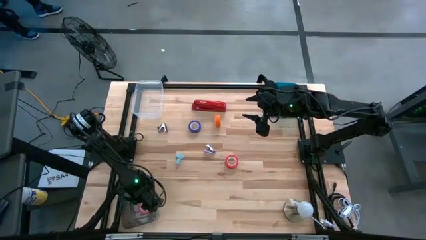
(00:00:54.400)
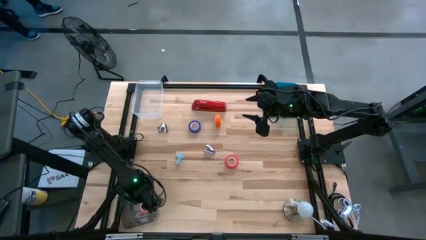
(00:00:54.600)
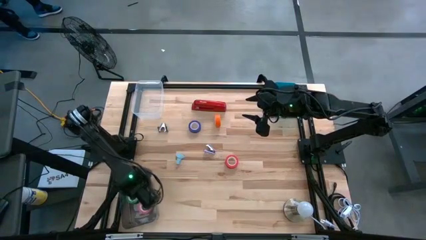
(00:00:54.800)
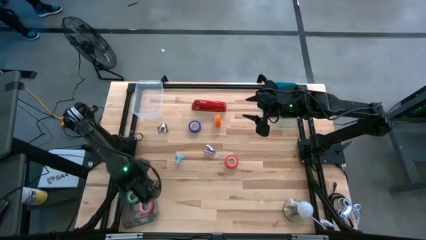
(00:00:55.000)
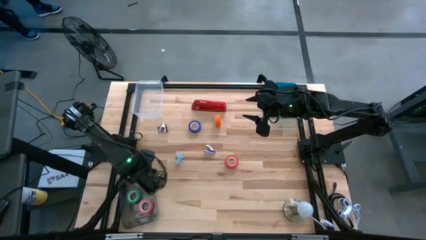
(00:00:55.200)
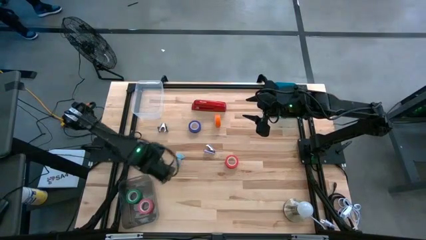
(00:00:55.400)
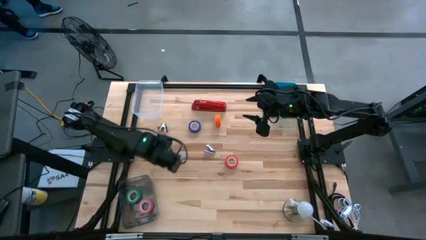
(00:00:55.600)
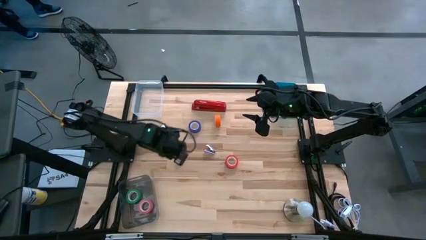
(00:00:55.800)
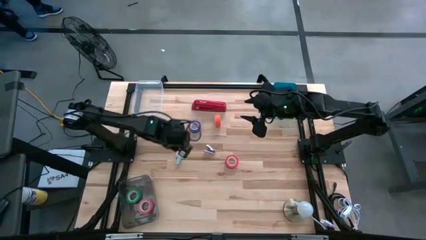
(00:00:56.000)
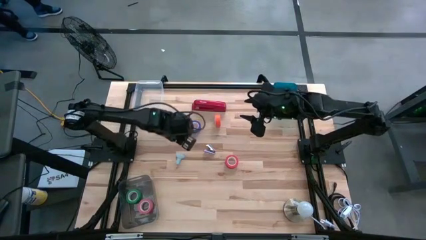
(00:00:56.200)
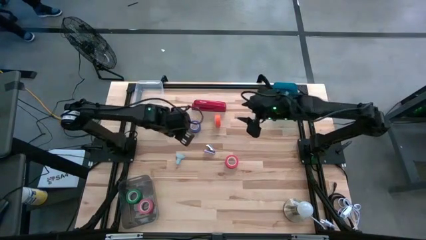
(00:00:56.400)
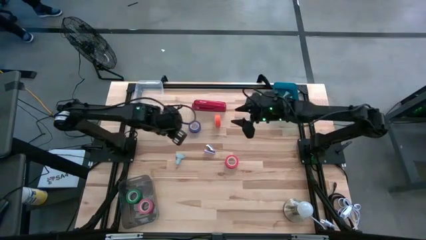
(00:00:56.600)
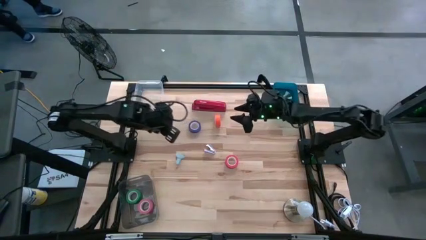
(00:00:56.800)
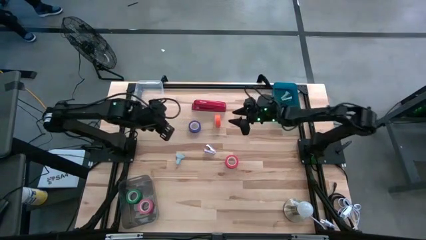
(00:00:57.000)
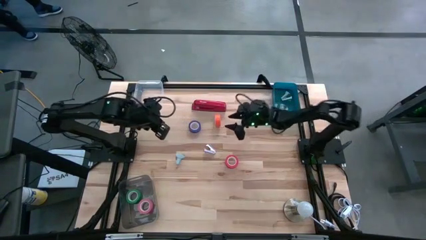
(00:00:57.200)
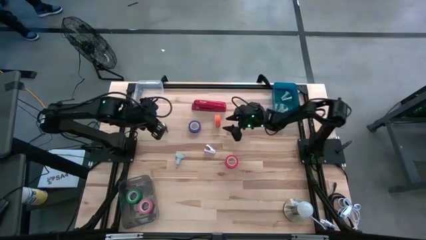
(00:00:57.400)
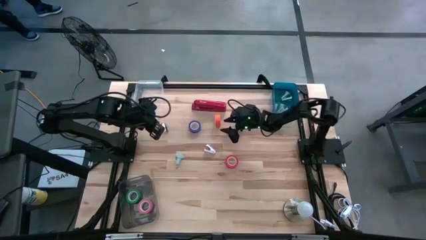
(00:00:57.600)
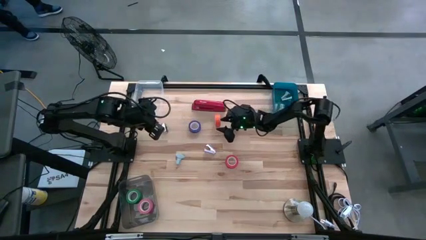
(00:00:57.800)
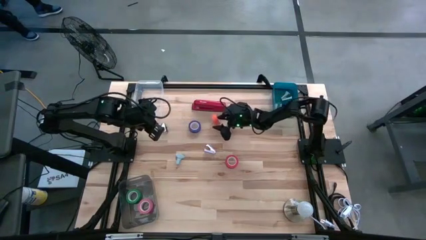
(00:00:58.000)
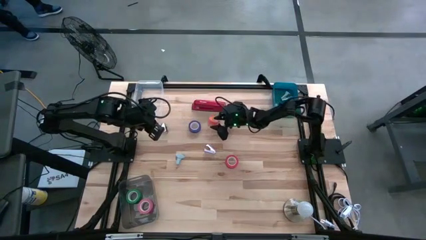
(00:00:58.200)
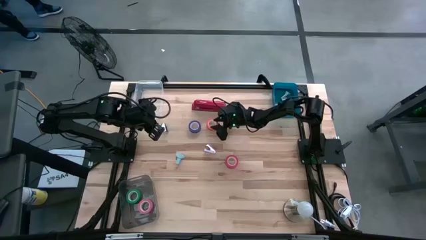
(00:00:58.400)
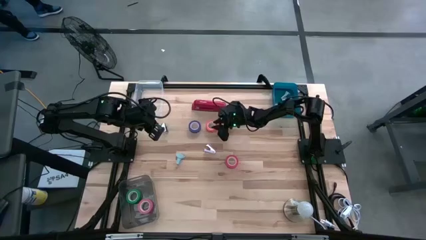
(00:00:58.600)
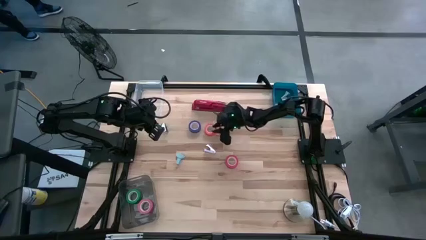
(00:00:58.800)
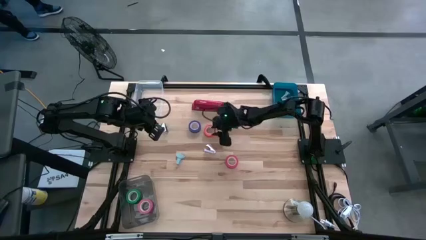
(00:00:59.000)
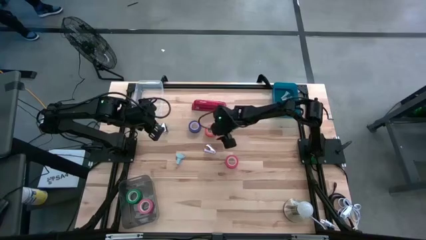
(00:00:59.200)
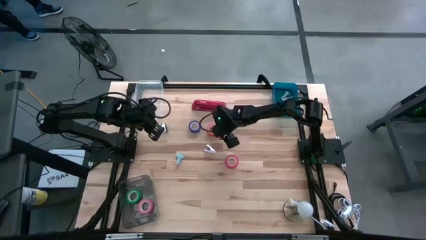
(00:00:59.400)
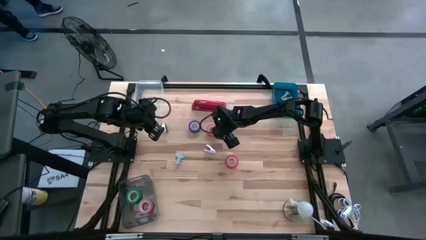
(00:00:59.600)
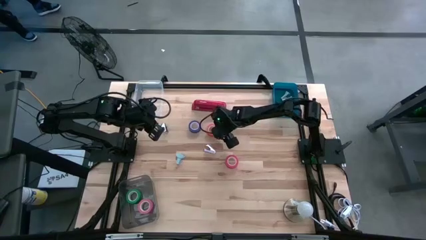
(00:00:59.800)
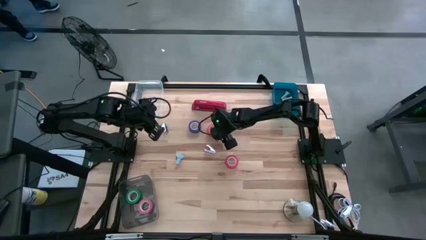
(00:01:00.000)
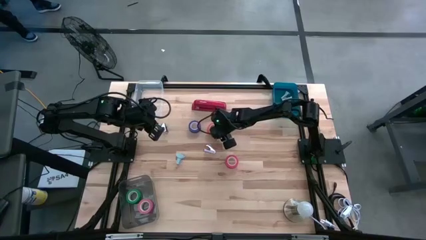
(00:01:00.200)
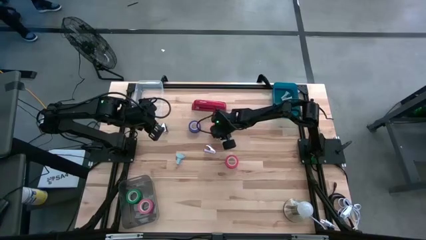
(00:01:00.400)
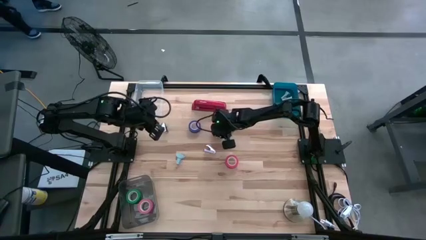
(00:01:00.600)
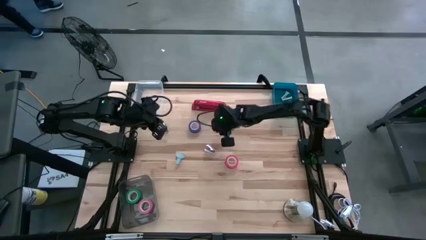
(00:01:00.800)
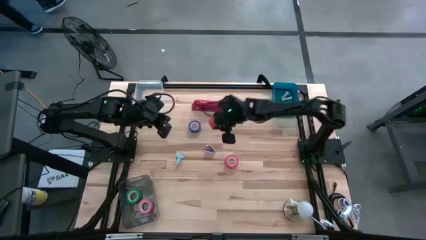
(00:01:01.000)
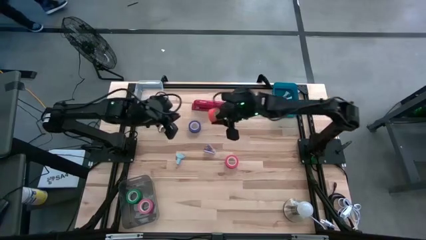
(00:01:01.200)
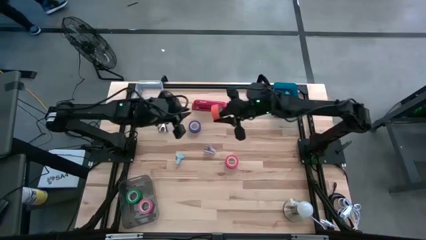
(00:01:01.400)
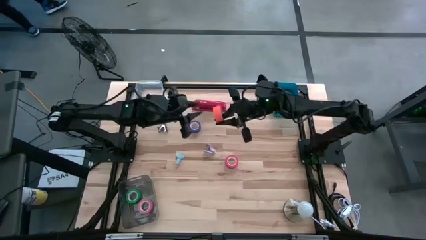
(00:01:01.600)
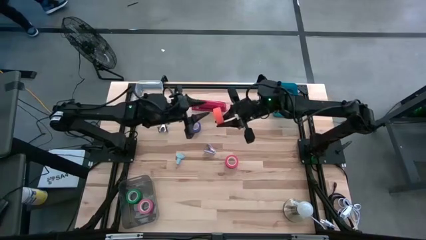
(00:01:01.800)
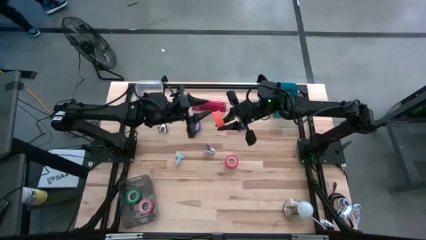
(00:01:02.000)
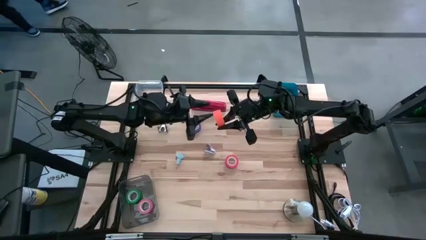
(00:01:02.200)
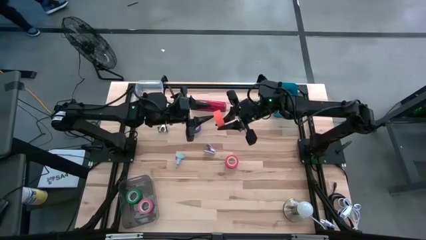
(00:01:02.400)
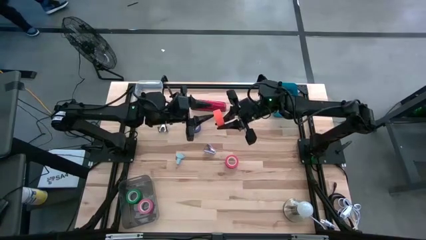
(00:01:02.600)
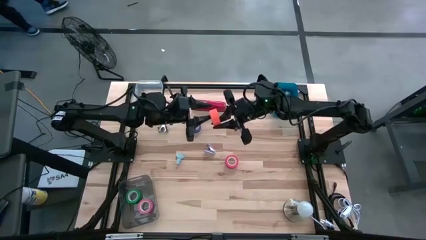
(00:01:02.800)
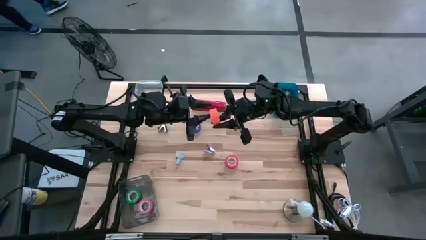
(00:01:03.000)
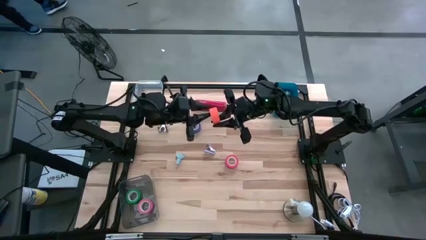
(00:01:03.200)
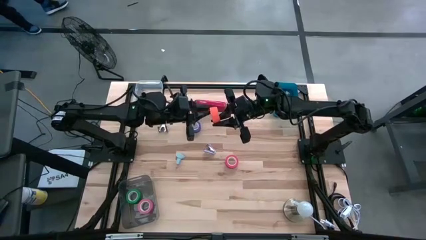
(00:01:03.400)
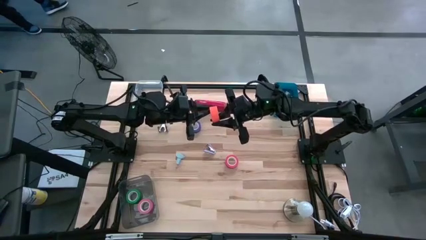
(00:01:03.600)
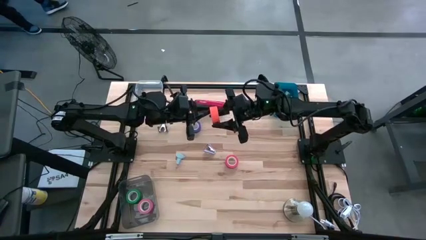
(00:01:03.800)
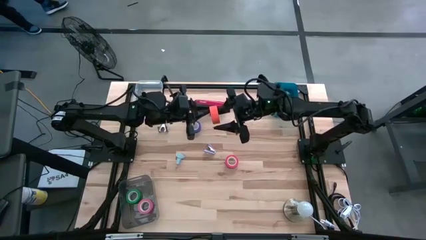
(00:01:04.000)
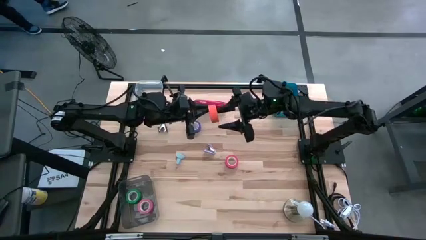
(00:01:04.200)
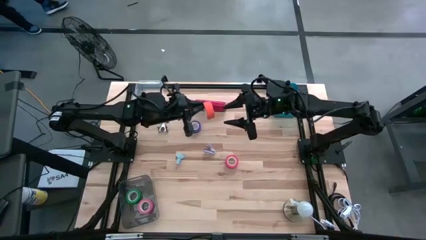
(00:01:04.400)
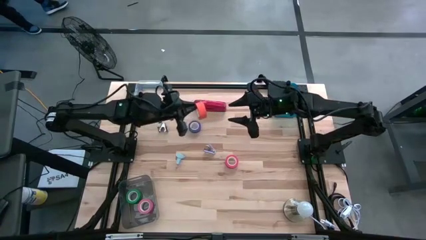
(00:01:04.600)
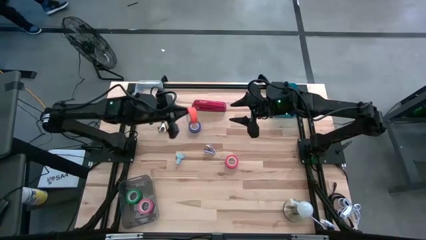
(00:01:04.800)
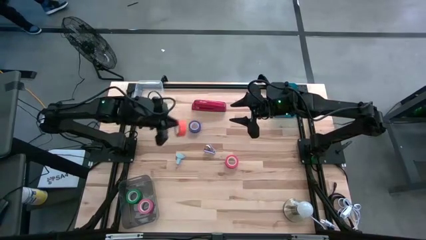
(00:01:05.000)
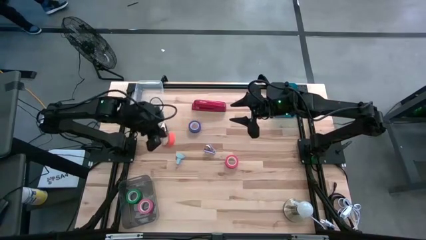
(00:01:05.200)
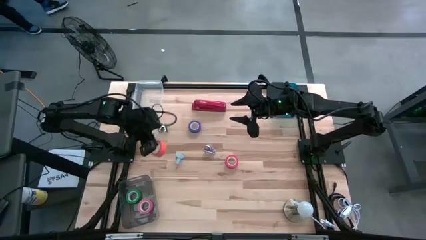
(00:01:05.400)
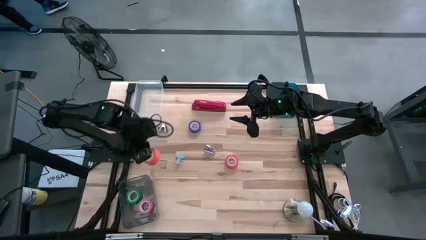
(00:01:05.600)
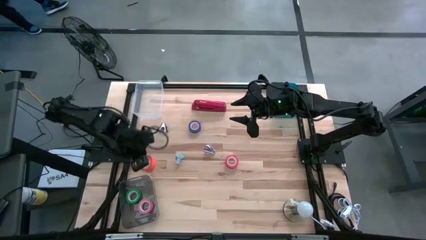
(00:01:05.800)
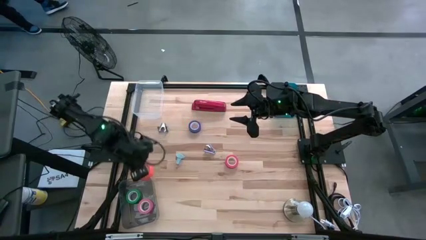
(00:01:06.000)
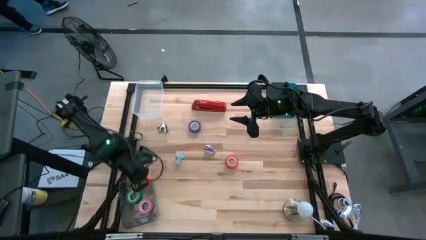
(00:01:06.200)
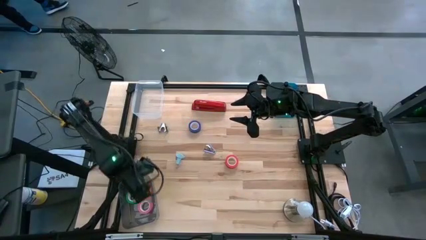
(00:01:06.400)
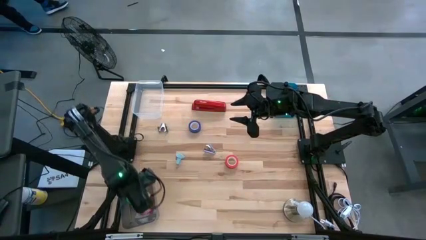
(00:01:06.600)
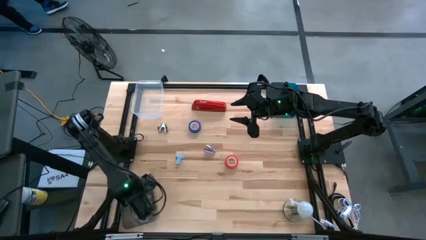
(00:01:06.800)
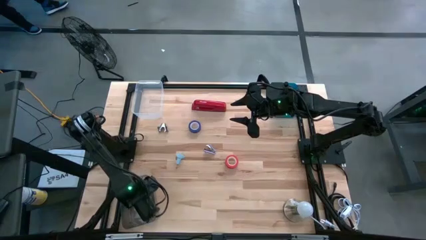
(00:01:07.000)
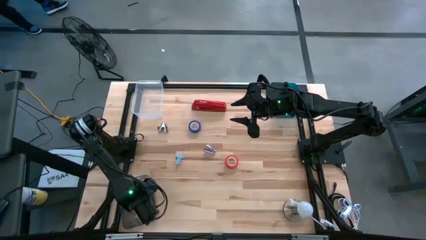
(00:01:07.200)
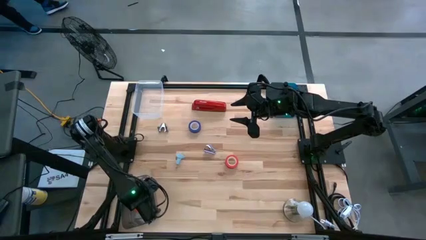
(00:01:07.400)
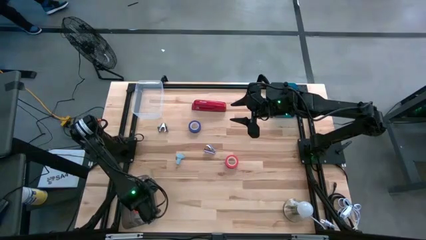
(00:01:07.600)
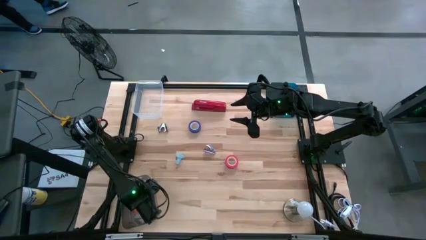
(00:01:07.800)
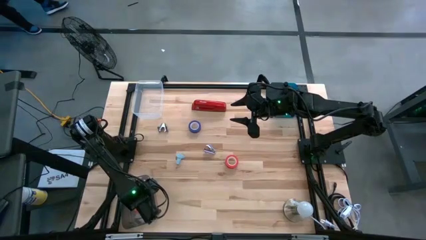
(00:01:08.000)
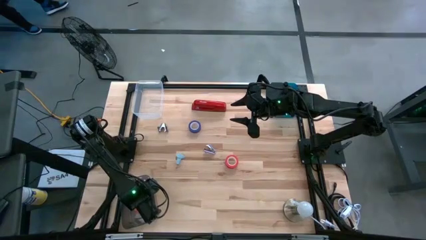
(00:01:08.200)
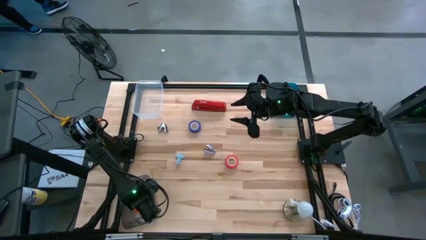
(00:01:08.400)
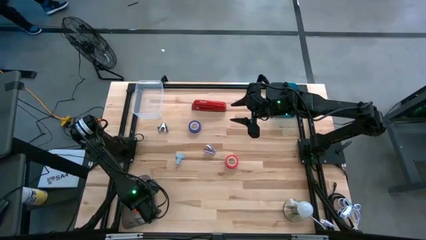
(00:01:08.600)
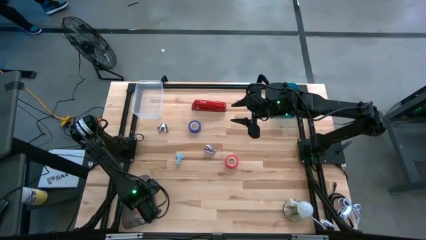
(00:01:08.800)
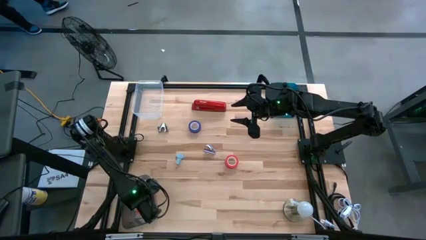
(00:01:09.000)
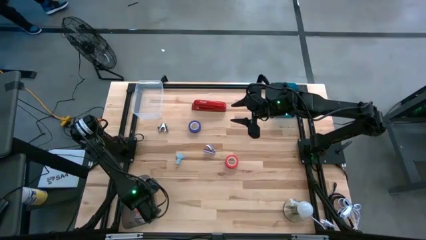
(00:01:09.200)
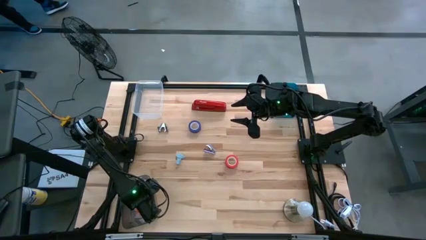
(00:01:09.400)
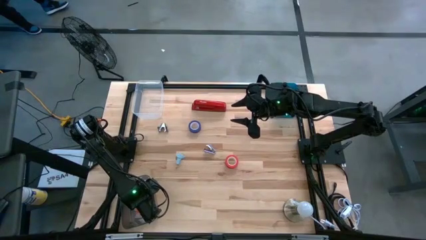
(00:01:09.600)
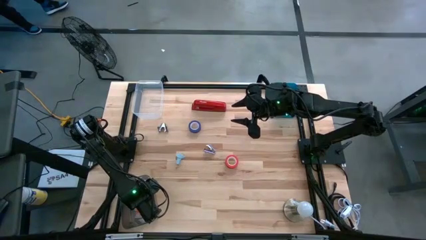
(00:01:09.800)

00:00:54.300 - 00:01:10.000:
Task: Pick and place Stapler, Stapler remover, tape
Put the orange tape into the black bin
